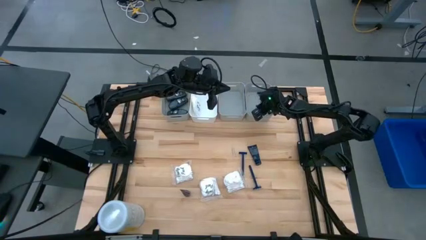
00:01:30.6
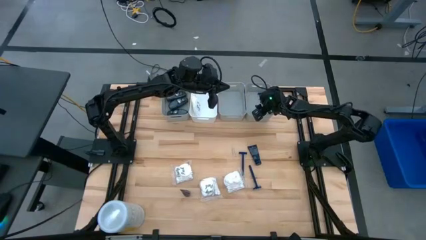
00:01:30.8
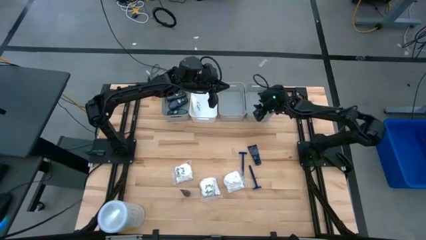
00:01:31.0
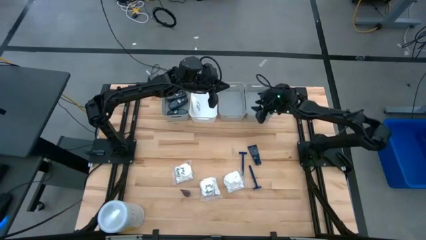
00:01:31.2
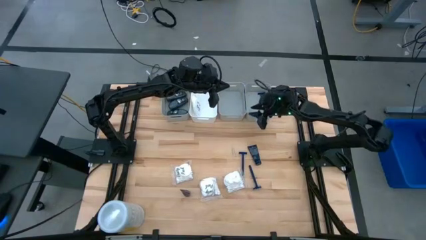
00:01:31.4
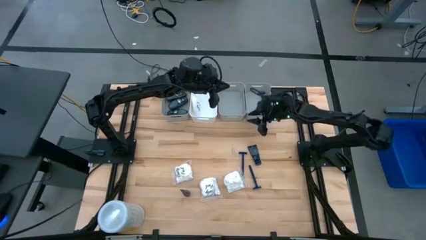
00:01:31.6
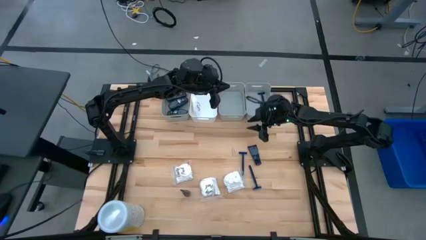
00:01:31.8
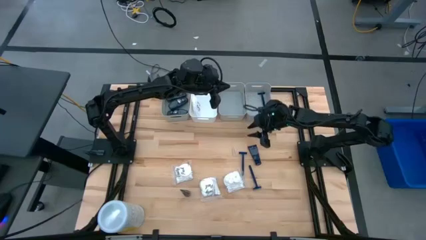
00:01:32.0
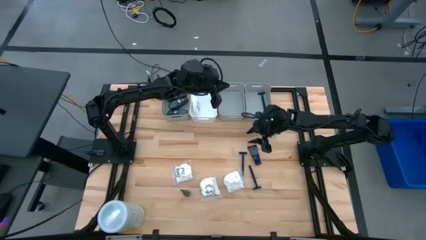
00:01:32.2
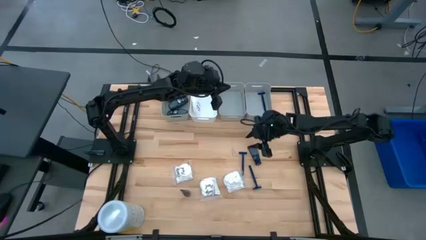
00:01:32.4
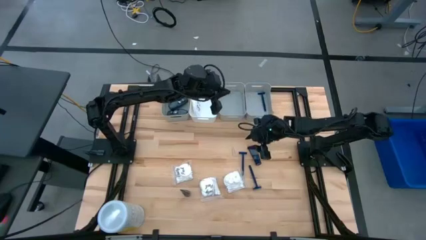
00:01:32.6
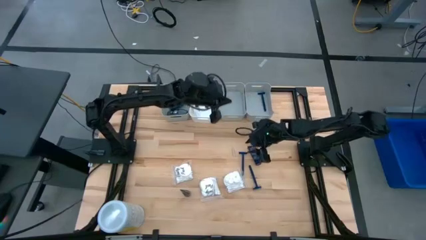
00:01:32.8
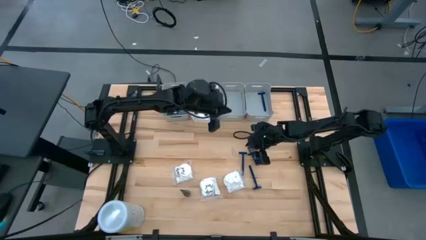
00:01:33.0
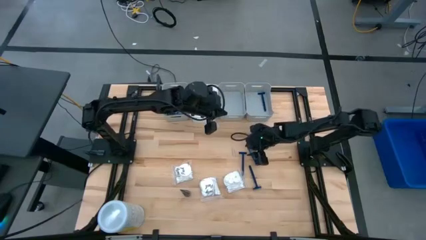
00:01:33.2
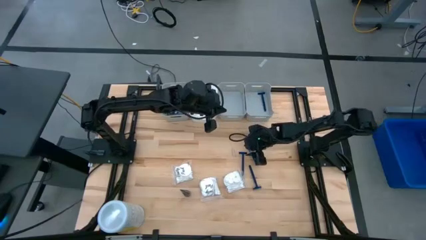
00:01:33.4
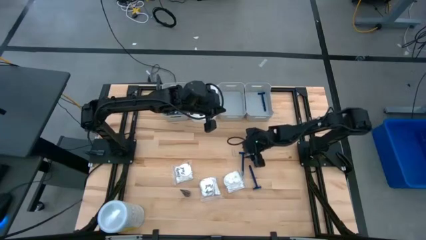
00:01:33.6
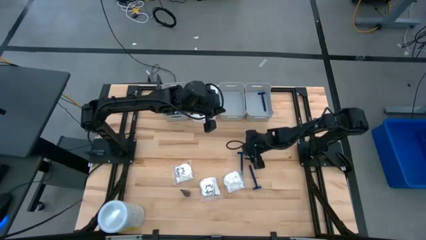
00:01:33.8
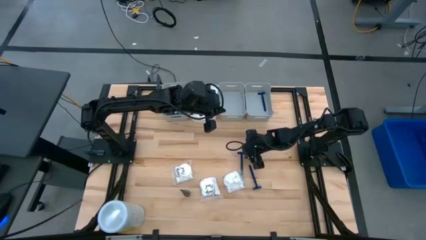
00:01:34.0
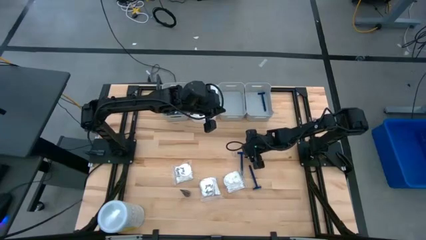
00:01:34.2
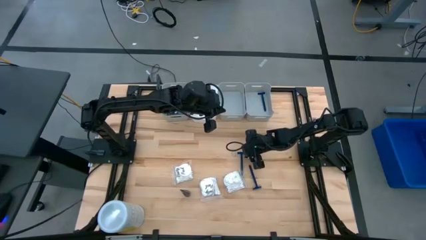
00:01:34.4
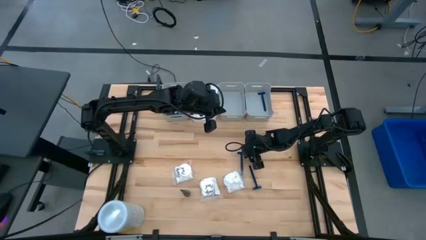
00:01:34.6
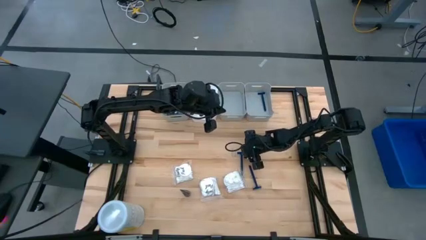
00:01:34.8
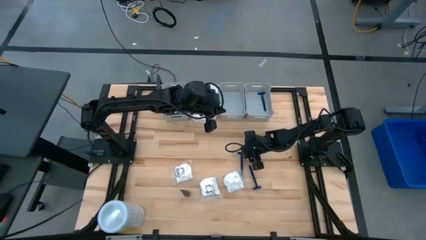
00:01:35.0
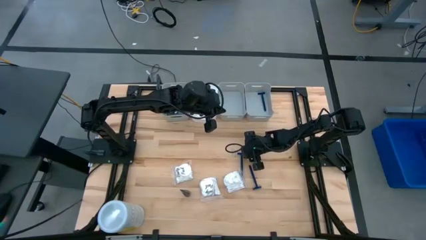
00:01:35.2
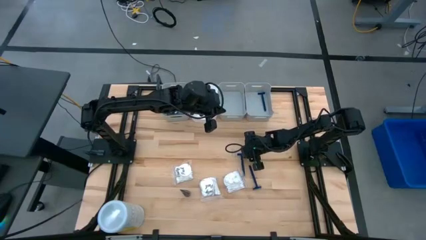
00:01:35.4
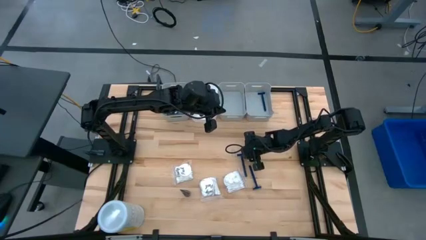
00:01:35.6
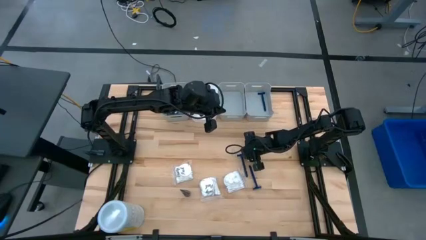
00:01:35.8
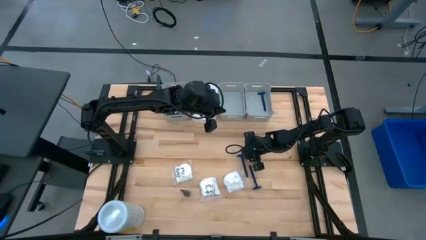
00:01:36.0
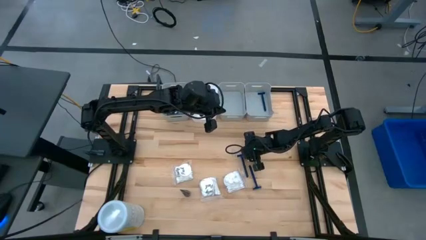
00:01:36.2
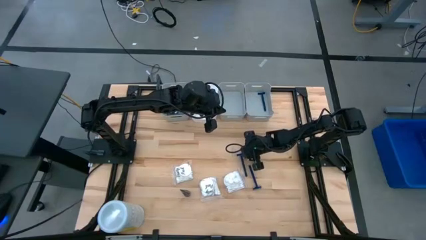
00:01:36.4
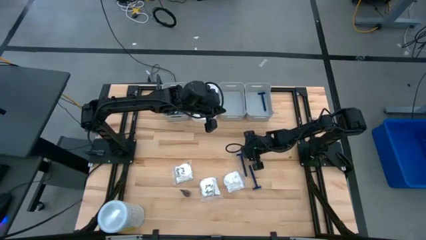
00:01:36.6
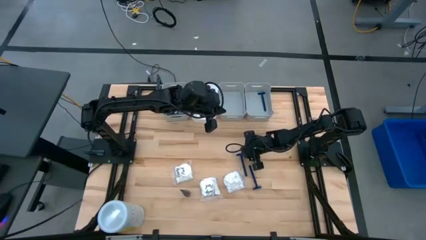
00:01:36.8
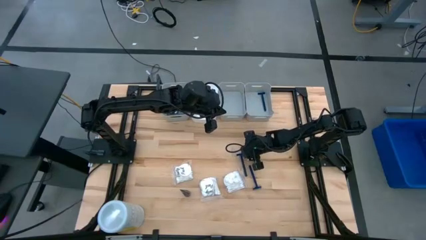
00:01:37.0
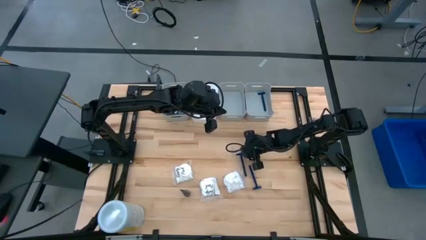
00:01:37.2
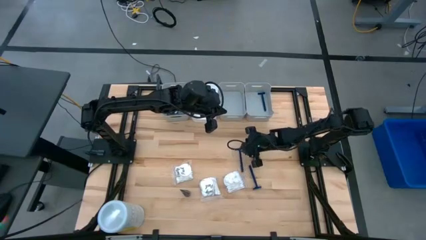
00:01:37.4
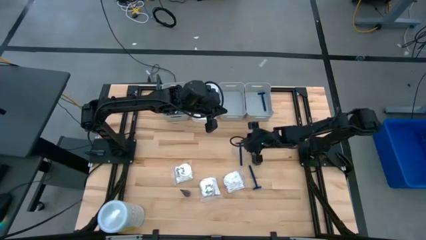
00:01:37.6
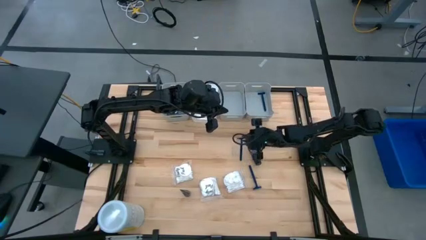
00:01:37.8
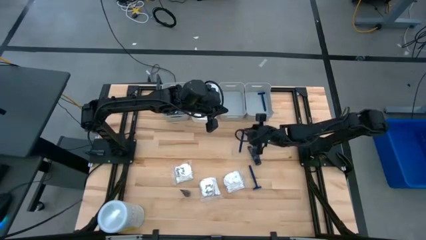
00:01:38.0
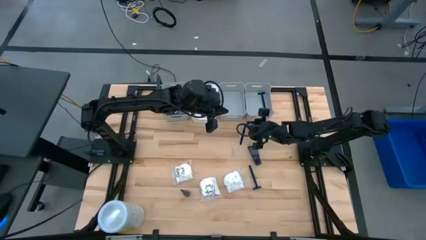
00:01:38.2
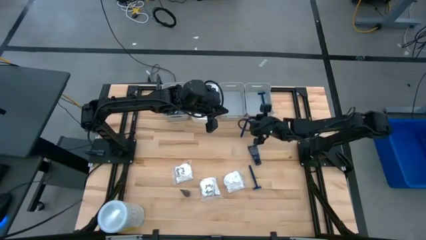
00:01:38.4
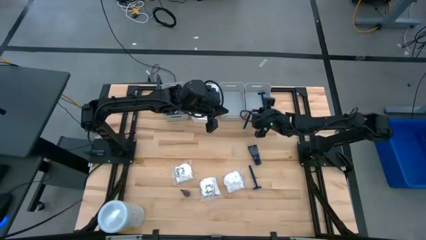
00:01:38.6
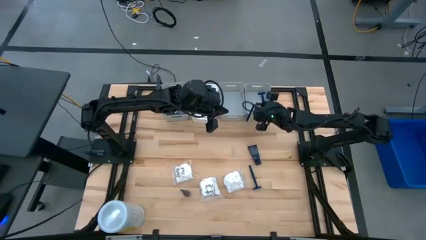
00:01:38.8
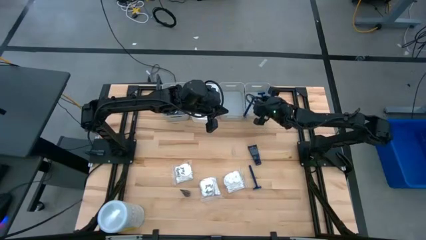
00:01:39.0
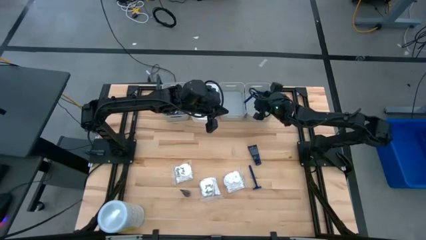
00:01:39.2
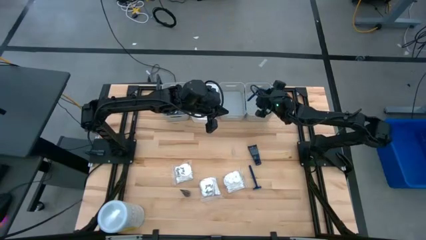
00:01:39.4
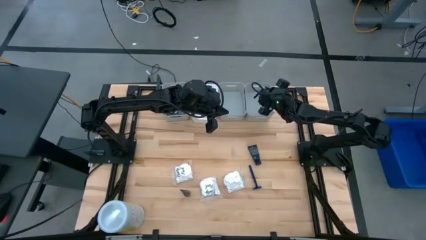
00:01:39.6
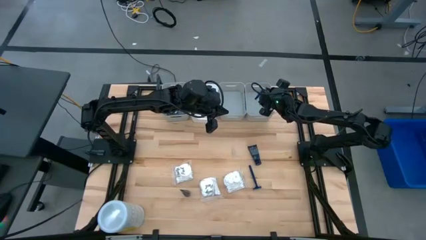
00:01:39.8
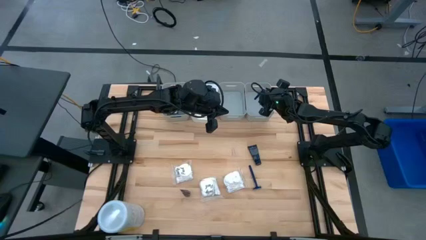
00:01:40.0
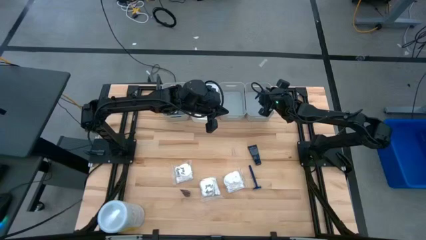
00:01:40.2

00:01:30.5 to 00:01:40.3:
Task: Pick & Place Travel size toiletries
Put the blue razor into the right gray bin

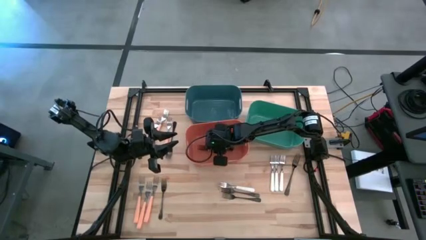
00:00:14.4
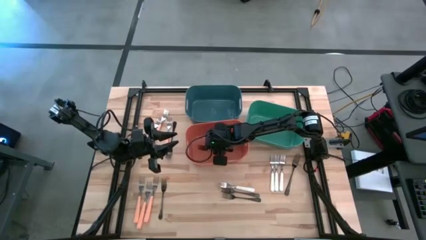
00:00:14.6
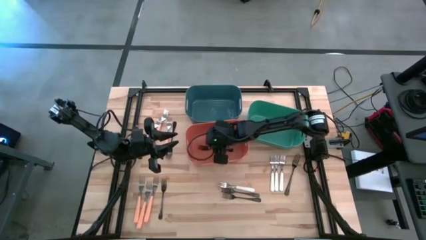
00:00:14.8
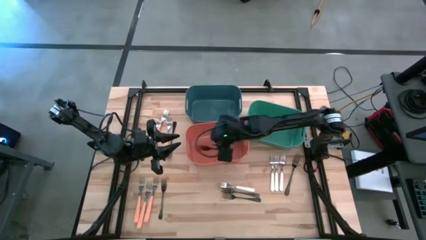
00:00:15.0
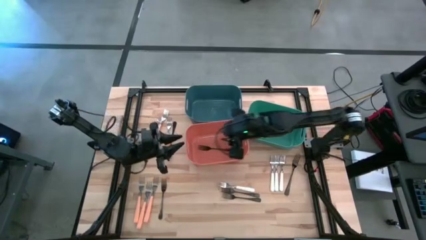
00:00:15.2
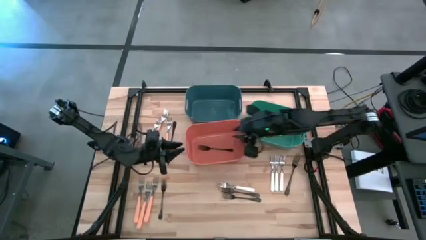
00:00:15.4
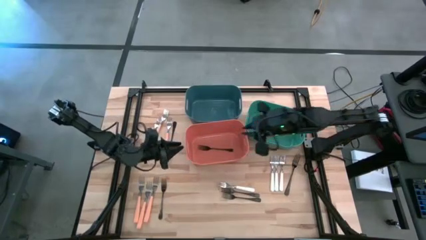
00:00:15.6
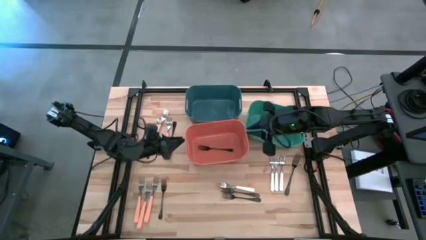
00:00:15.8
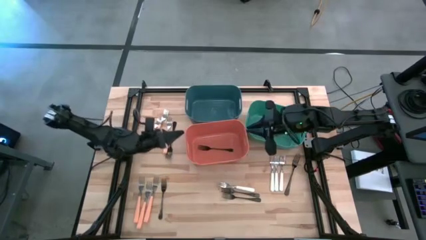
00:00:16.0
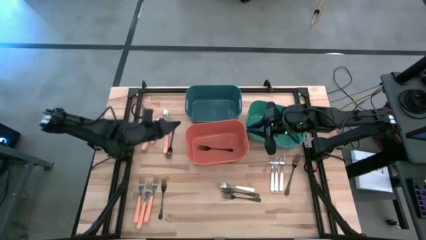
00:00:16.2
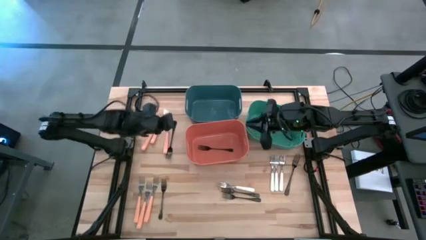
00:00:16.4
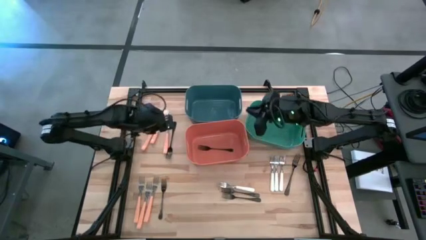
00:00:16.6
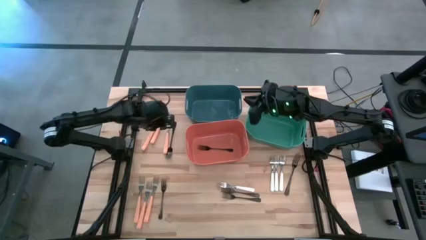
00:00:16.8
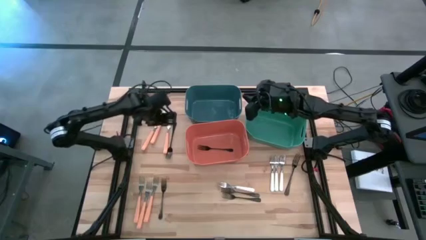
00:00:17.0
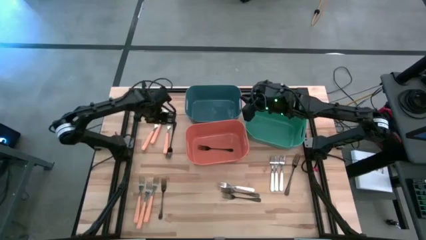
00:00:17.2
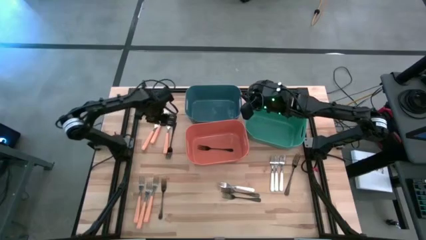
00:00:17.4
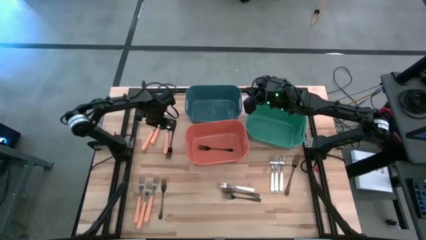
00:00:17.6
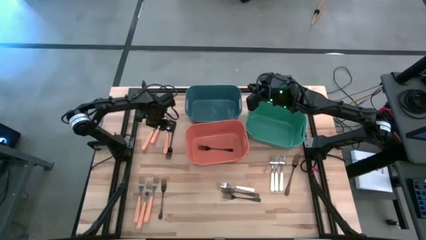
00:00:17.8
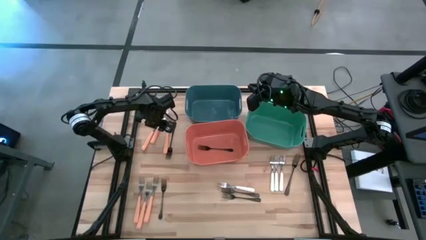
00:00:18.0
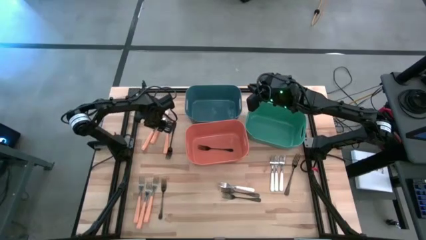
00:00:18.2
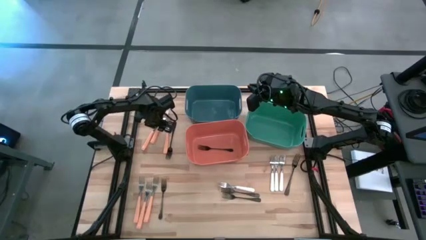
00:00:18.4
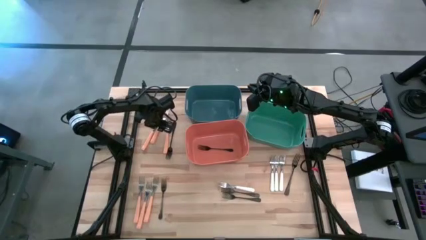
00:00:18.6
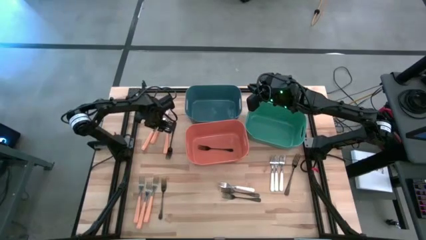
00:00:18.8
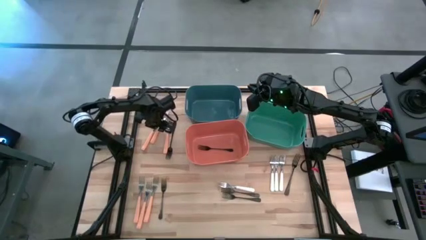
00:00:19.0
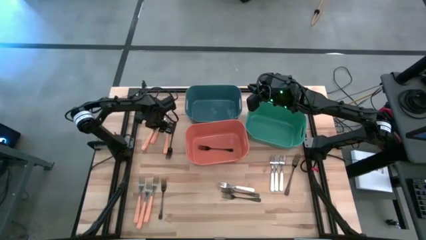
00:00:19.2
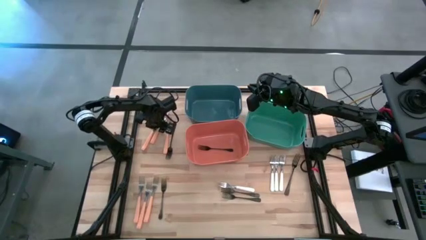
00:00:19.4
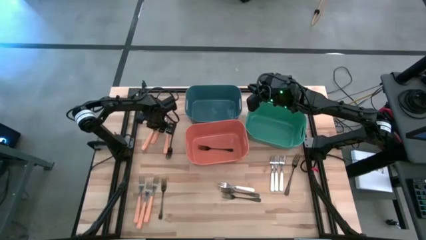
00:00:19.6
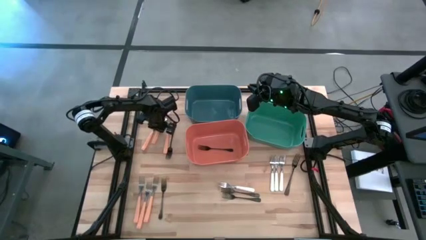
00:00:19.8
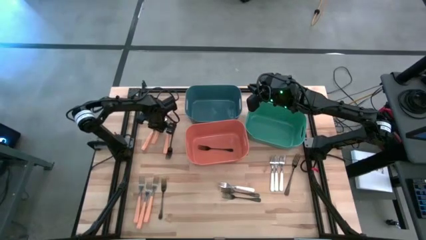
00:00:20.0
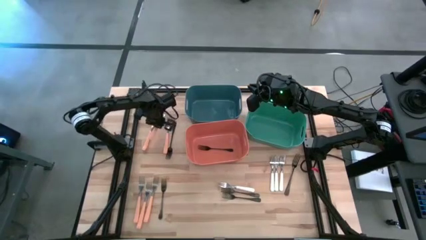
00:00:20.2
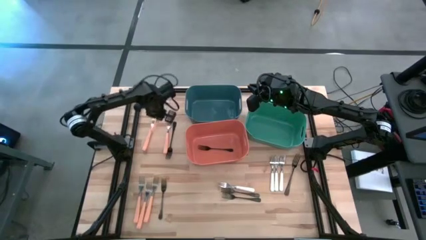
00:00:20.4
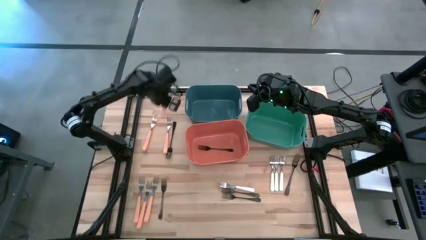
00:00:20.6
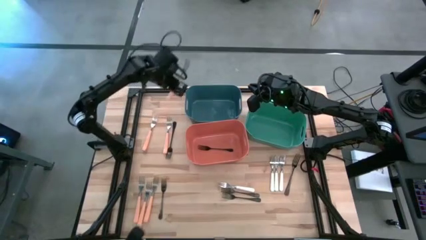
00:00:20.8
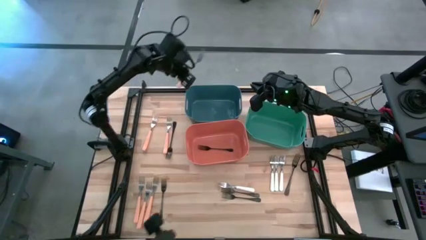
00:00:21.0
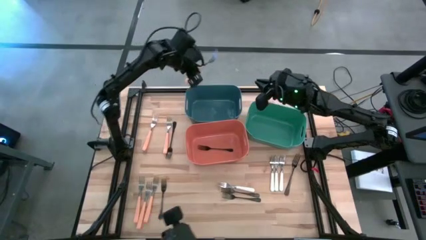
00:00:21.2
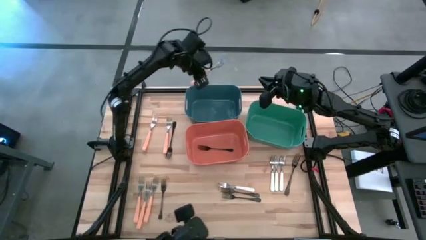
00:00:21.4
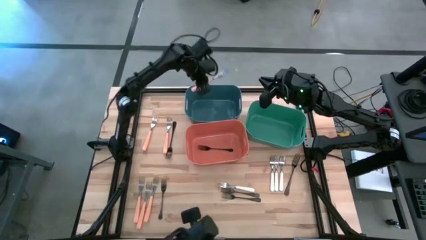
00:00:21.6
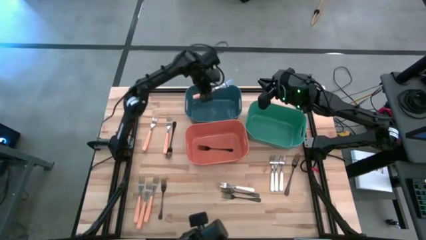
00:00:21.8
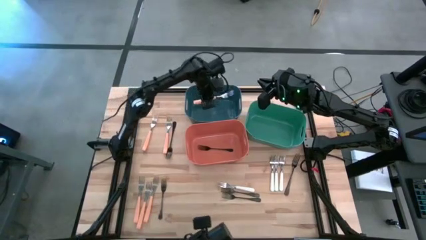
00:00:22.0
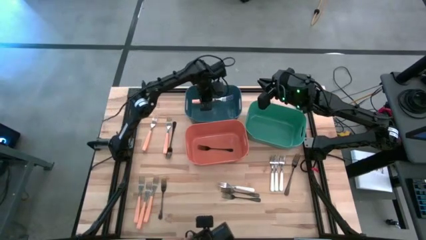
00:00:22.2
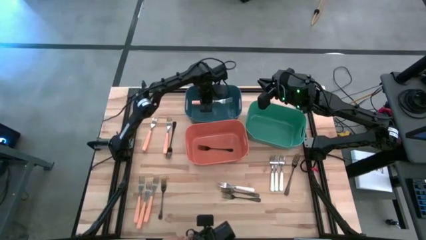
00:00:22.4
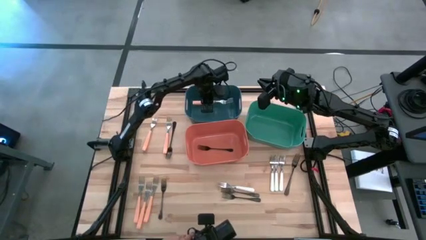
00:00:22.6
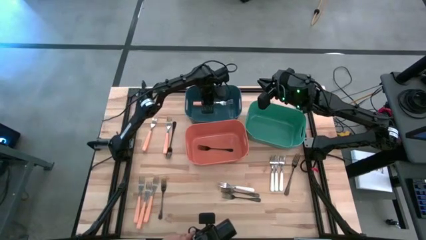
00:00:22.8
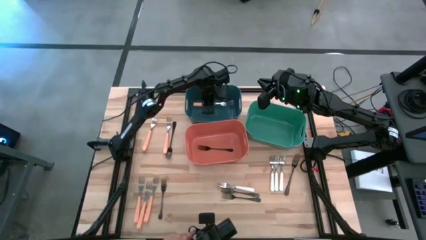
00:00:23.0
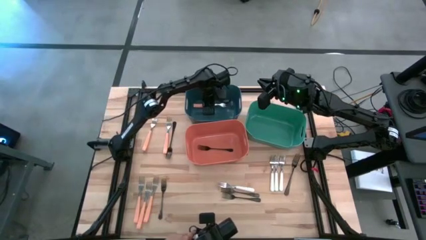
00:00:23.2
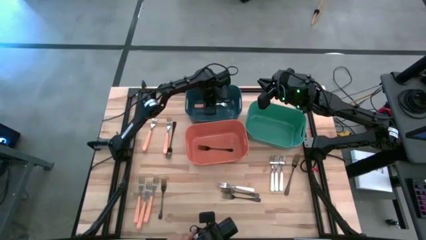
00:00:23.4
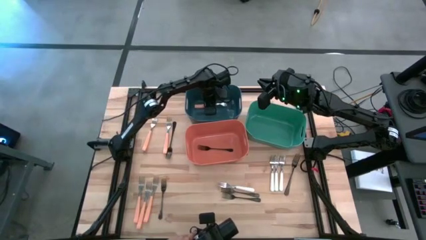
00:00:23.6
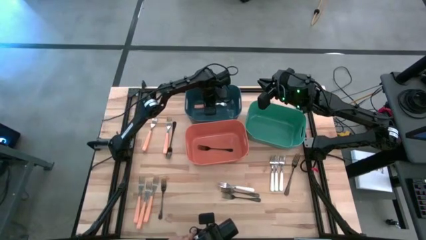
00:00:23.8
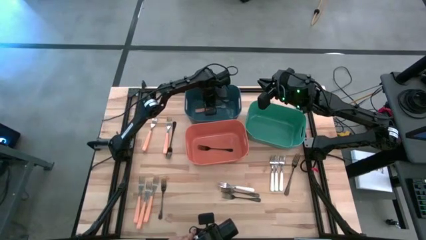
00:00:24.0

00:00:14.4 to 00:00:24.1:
Task: Sort silverware by color (type)
Put the orange fork into the blue bin
